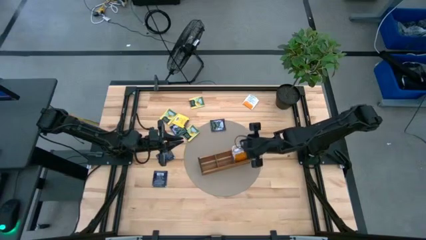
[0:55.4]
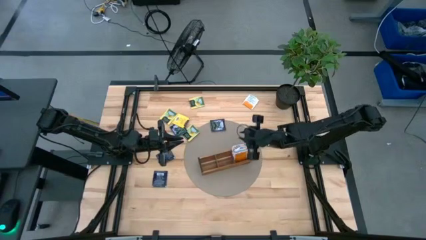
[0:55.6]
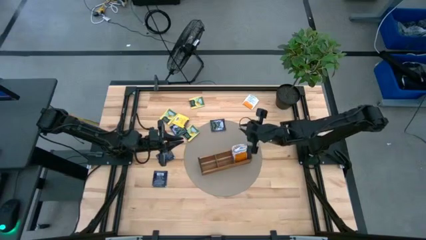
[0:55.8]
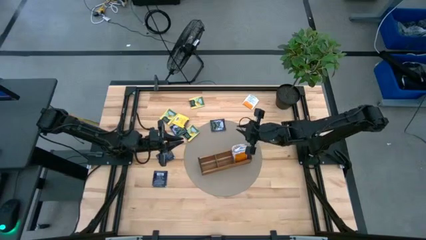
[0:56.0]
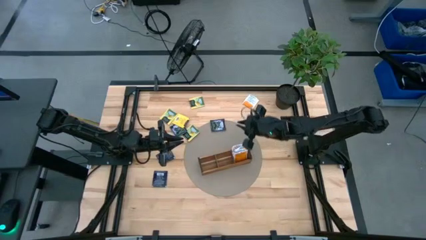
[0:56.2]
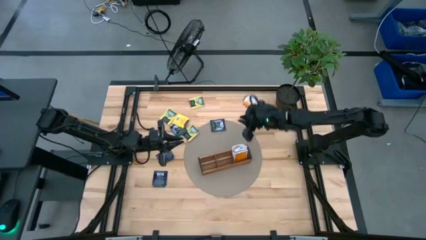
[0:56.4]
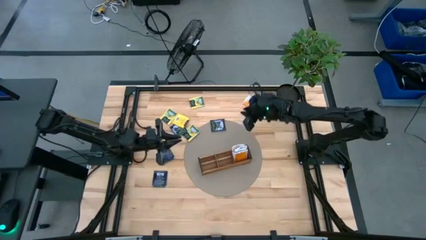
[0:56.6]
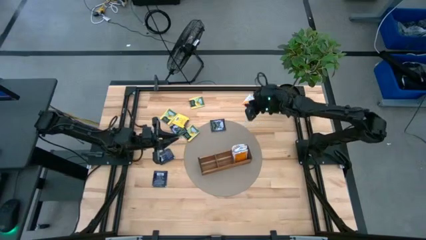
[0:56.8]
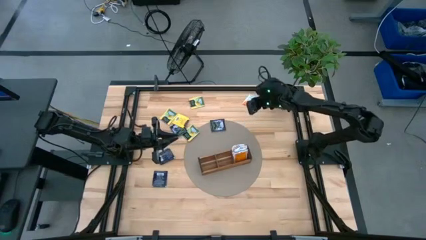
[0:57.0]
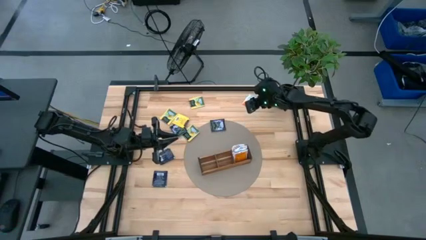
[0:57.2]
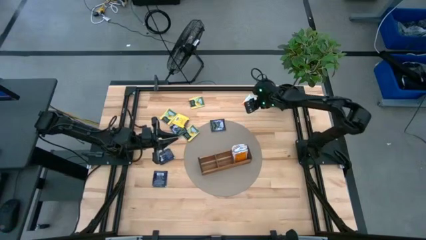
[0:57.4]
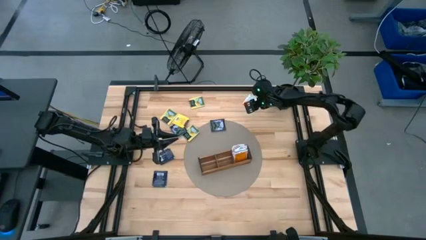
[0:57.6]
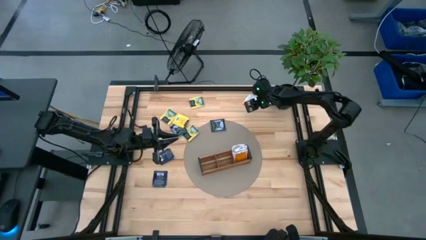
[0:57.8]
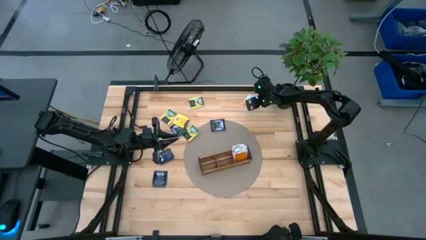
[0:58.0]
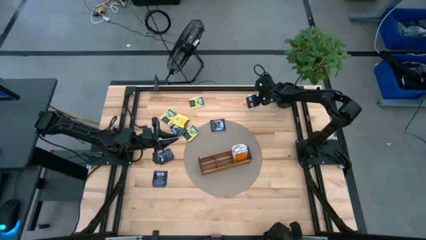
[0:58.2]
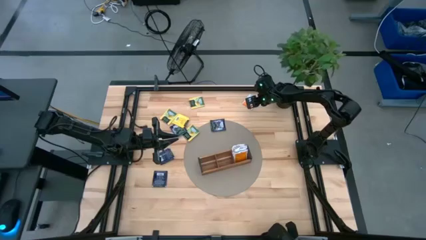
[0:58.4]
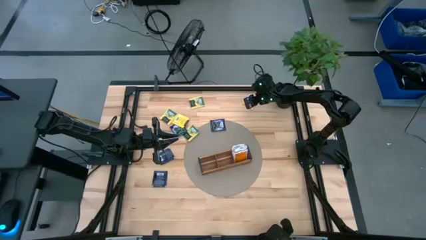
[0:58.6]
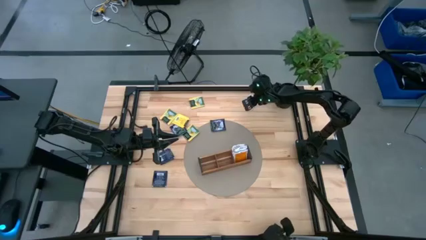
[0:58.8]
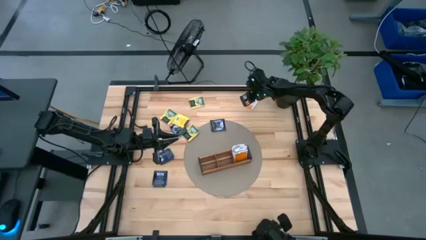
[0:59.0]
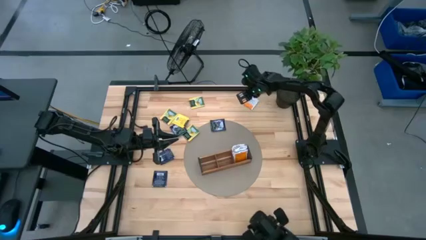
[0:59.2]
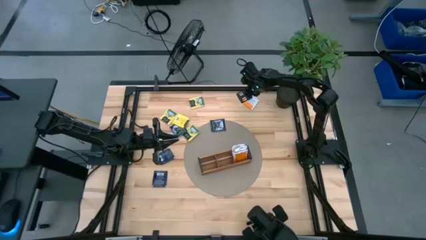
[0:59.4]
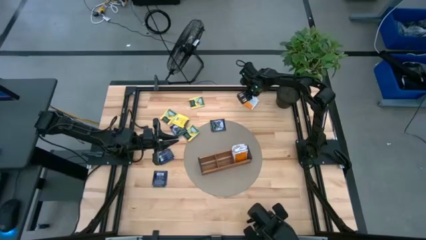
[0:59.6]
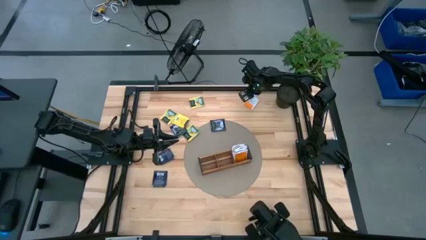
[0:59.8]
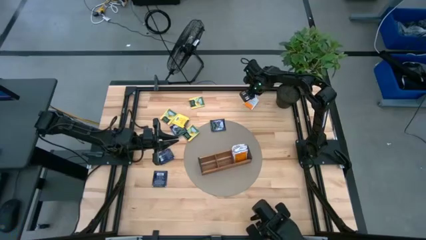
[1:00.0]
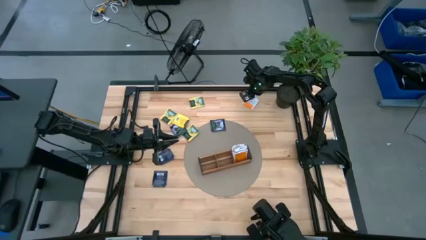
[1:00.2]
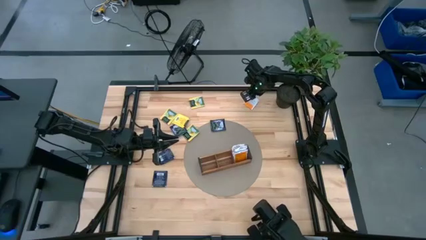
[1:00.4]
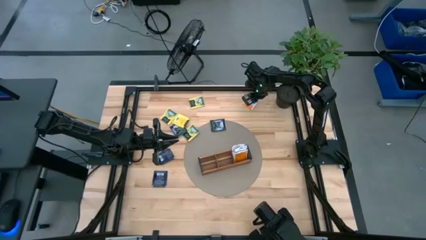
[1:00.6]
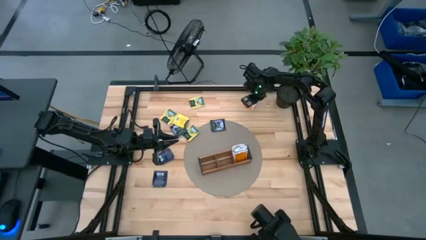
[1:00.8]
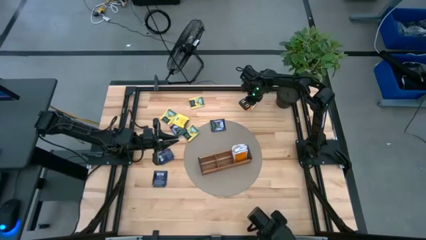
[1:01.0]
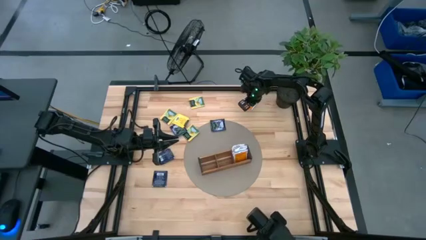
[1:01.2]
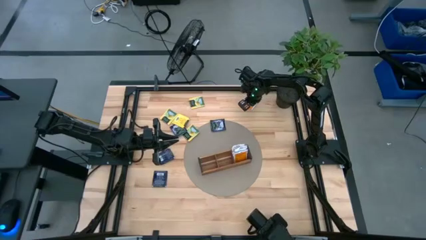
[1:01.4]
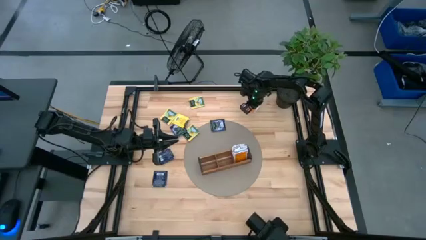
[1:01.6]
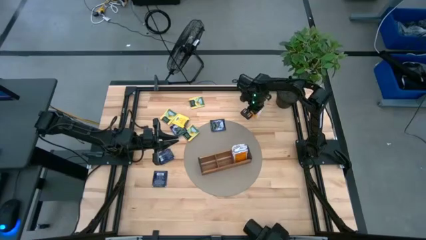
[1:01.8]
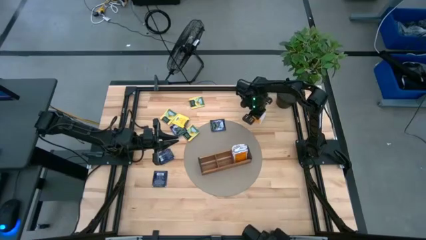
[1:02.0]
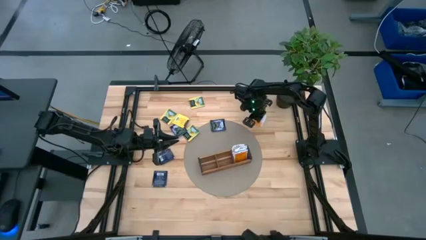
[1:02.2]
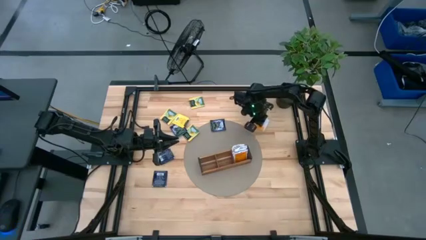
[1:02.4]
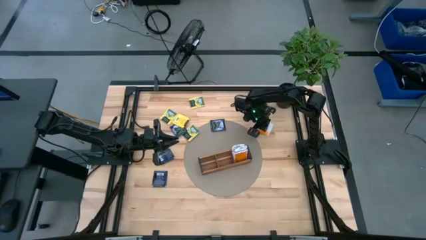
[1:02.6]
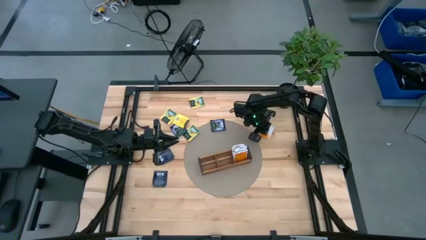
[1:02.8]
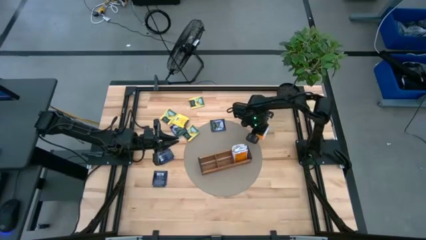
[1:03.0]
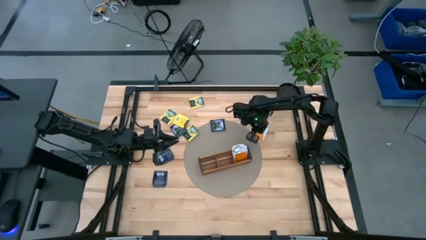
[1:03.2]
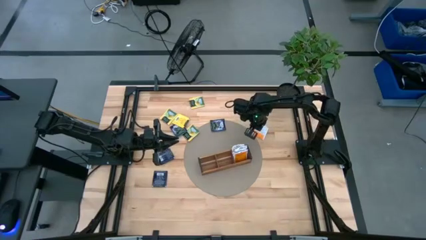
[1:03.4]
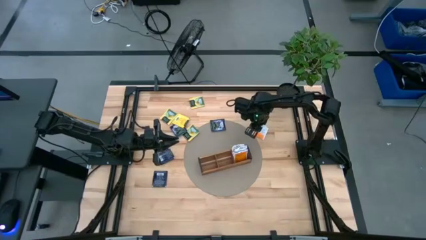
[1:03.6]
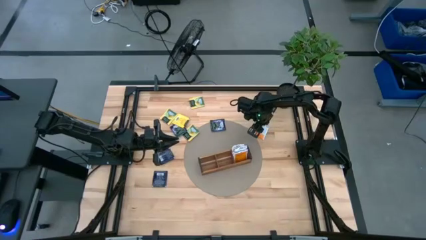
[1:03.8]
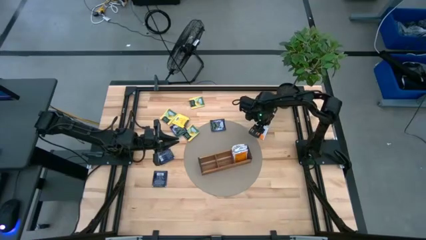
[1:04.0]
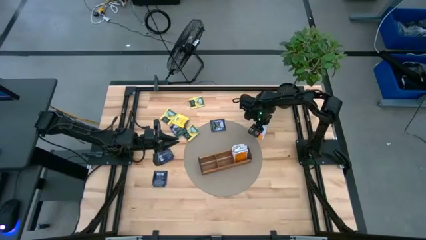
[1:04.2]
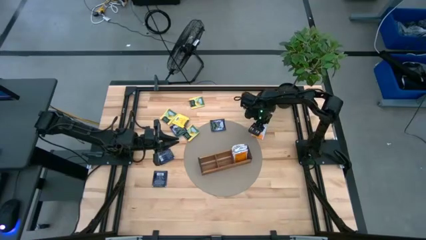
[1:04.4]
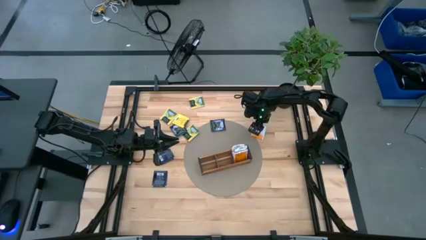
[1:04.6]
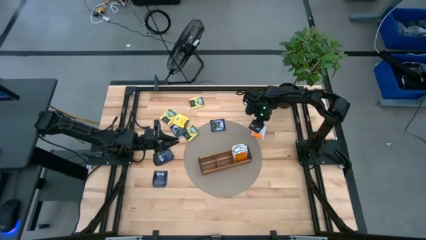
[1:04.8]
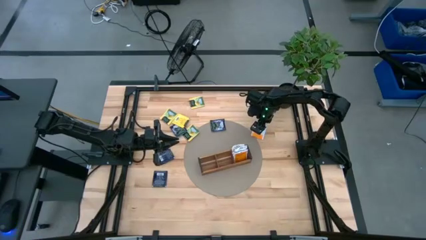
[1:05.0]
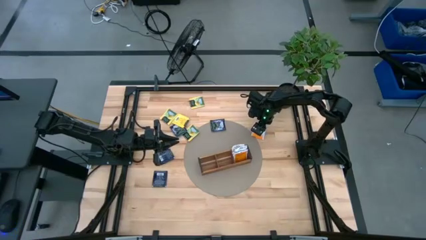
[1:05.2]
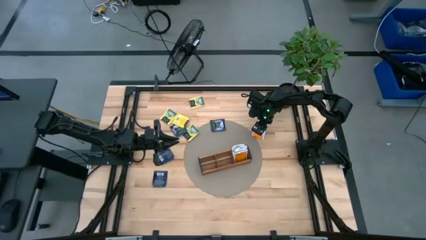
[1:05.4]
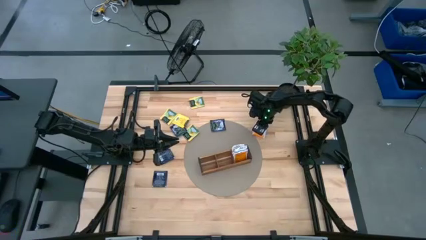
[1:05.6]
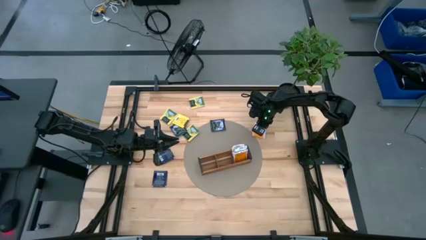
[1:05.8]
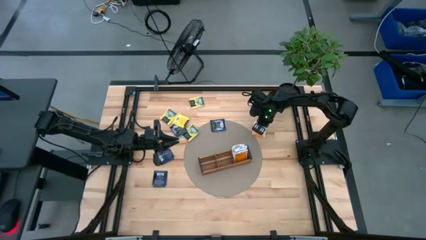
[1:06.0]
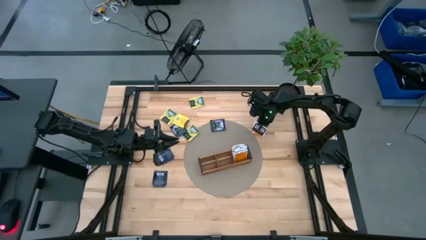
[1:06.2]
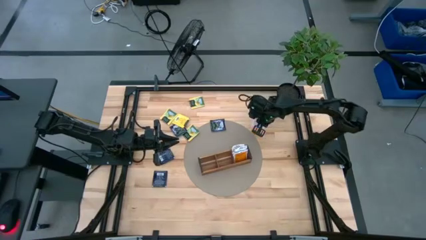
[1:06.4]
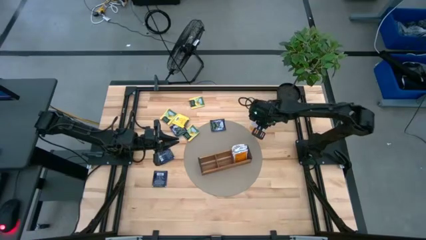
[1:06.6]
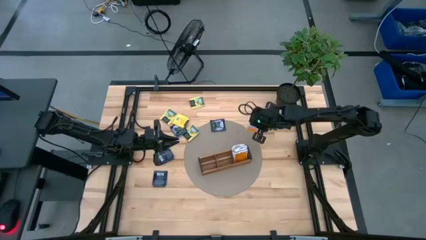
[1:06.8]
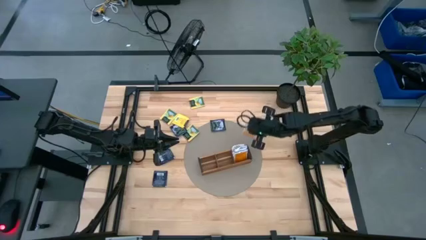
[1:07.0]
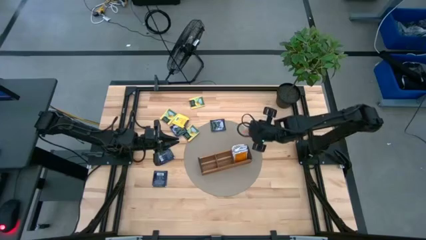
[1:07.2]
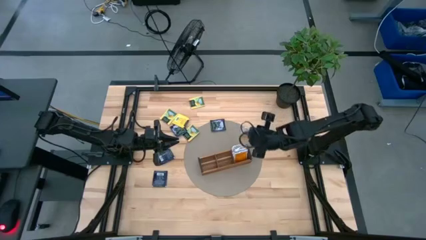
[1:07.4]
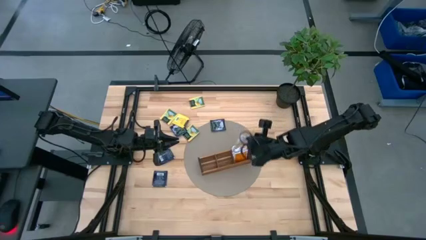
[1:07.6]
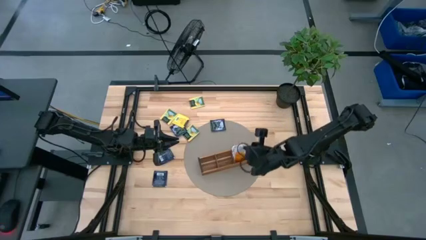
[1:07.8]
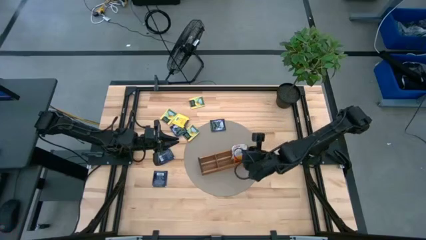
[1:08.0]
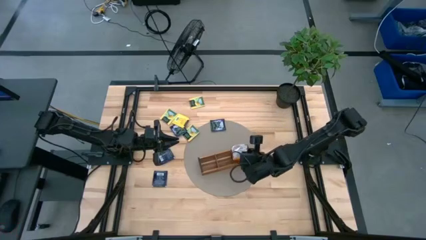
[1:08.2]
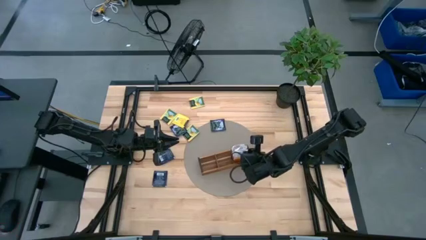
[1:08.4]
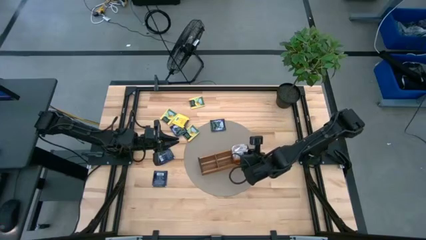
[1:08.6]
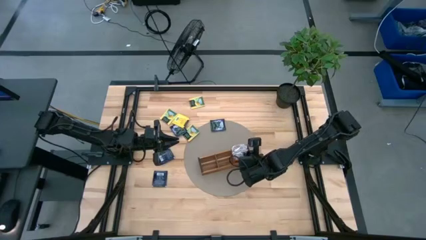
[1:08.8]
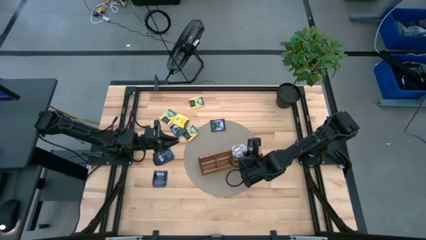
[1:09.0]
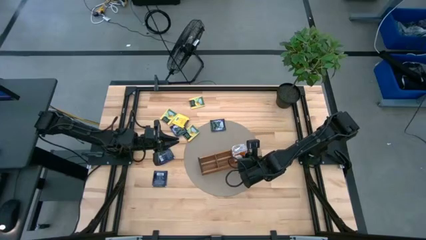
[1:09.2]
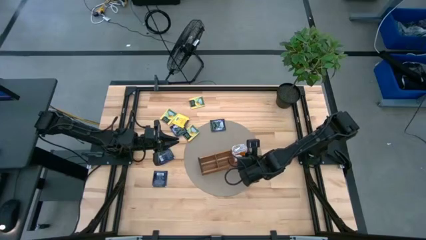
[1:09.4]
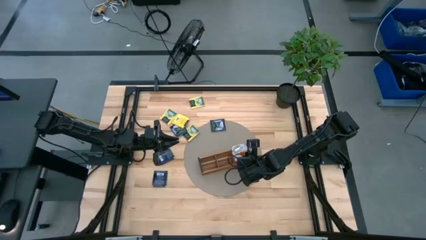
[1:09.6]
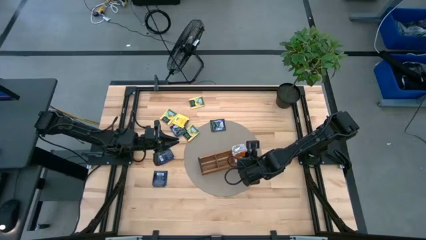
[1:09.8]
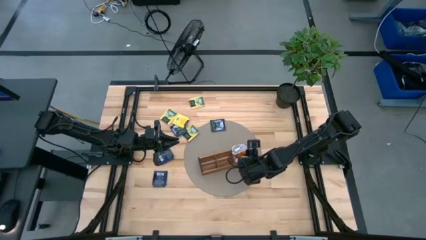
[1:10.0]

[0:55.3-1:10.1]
Task: Pick & Place Tea
Put the orange tea bag into the right section of the wooden organizer

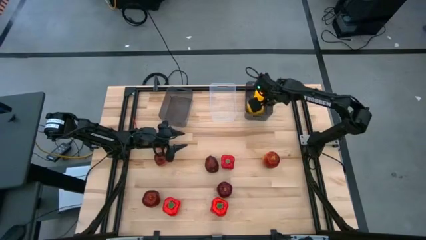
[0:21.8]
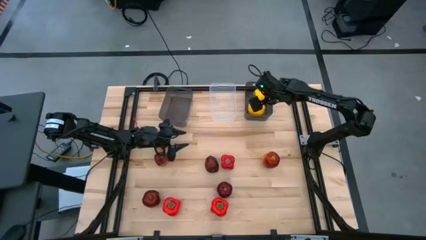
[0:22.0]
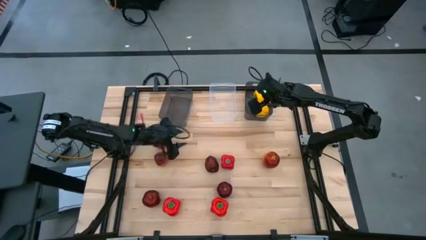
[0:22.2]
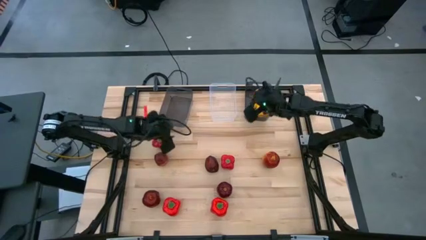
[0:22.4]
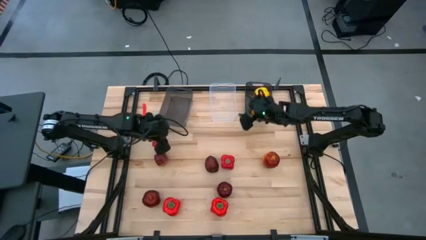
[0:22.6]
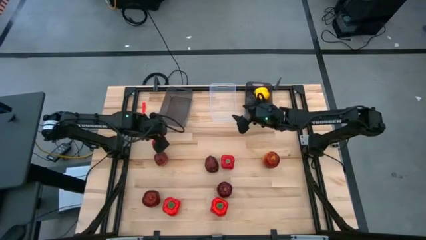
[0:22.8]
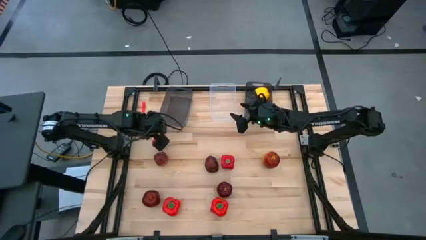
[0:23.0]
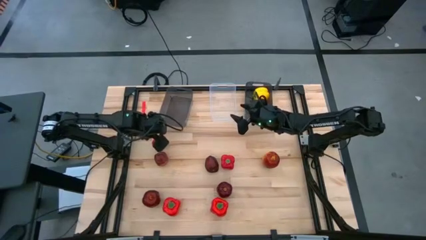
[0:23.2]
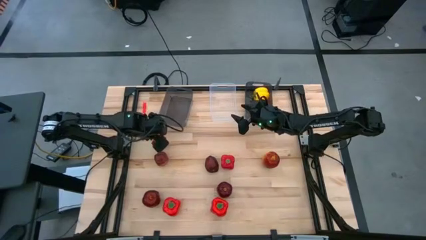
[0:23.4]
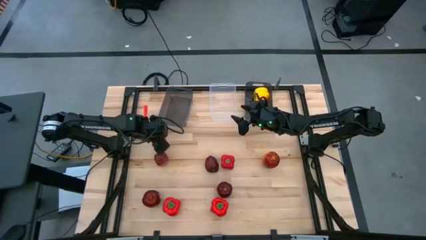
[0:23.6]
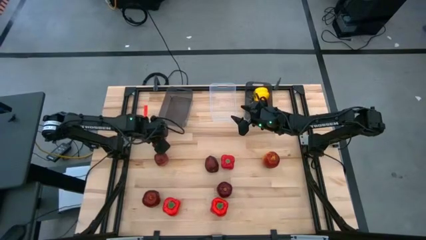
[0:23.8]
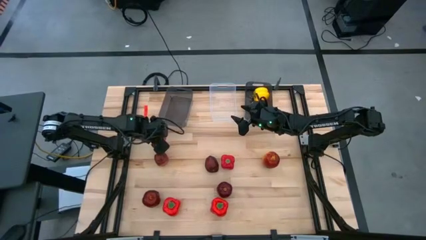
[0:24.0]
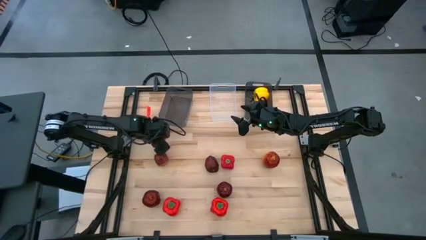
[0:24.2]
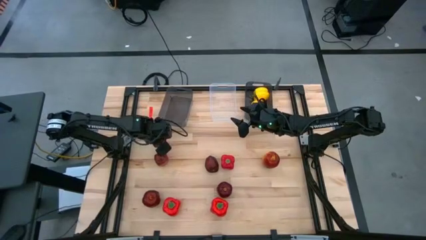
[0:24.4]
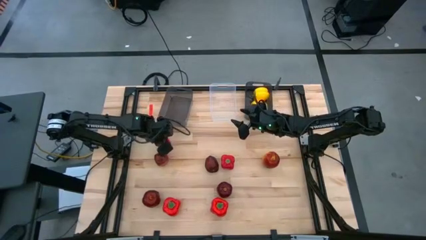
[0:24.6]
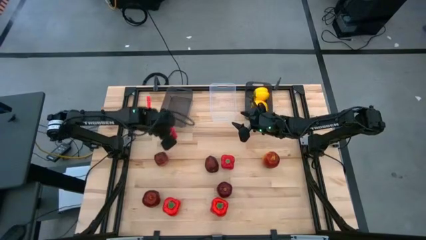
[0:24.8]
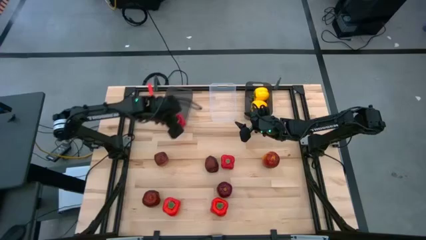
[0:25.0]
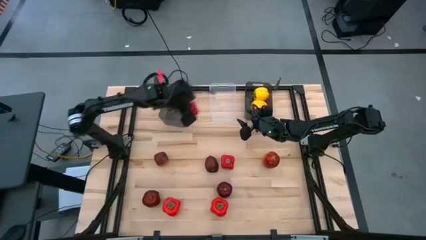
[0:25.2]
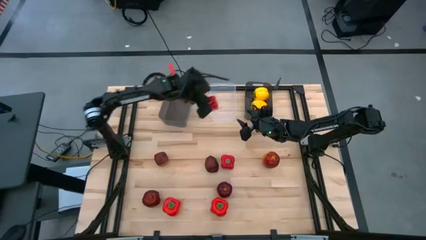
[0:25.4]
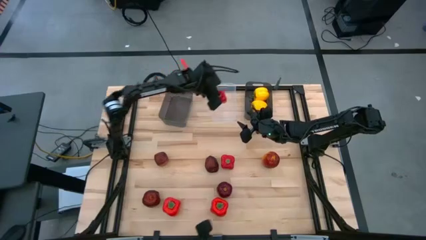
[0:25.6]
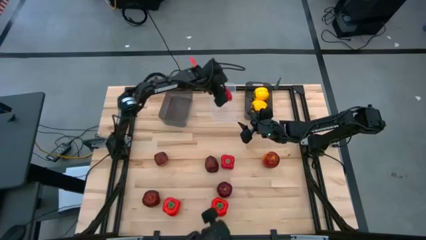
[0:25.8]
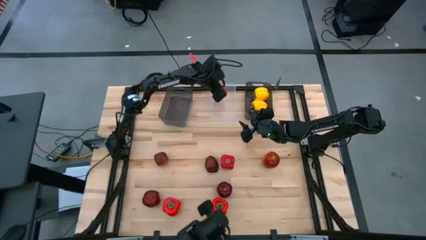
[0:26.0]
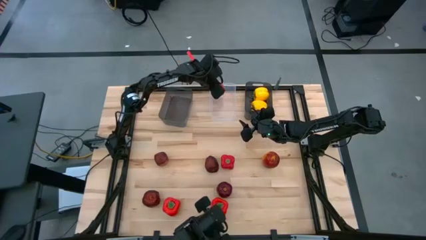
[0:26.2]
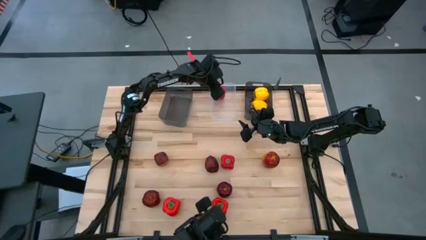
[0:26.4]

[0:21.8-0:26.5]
Task: Sort produce into baskets
Put the top left red bell pepper into the transparent bin
